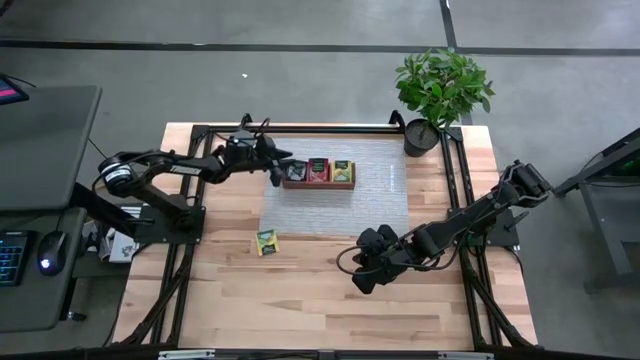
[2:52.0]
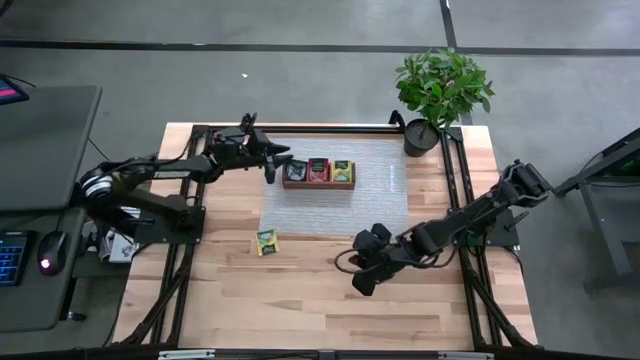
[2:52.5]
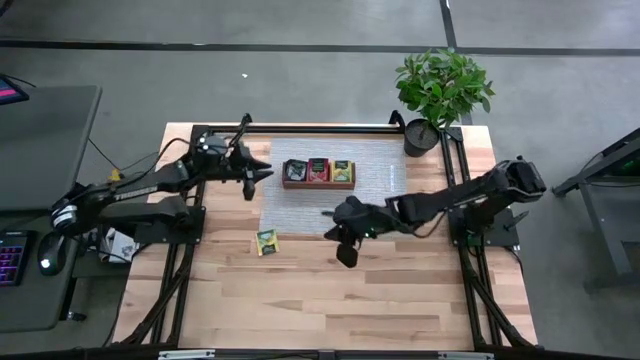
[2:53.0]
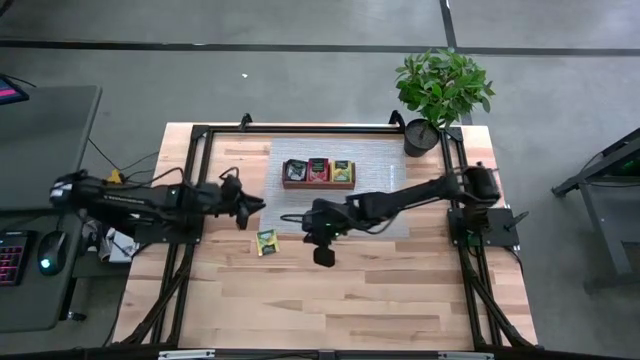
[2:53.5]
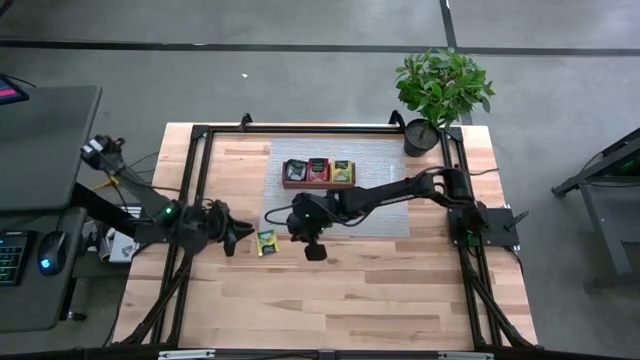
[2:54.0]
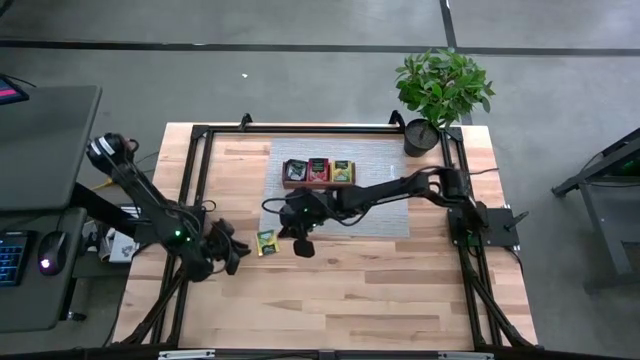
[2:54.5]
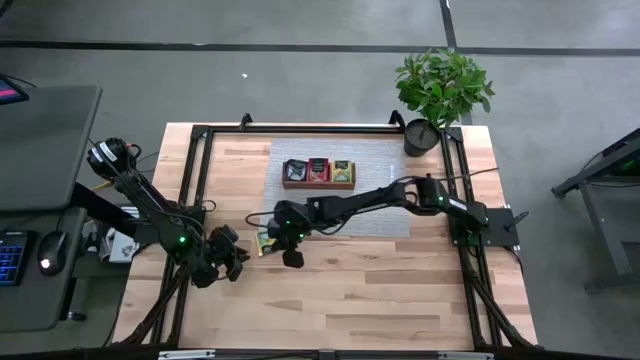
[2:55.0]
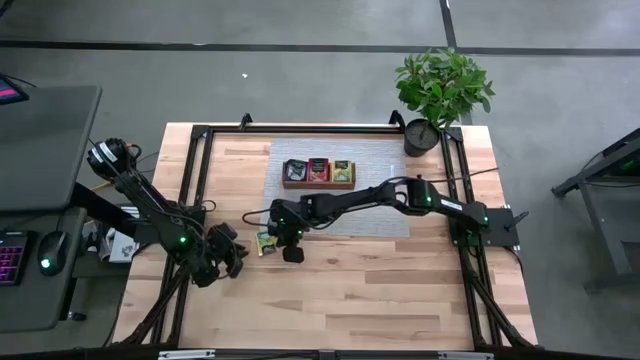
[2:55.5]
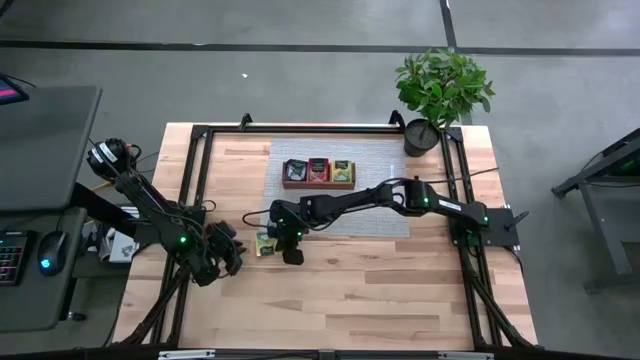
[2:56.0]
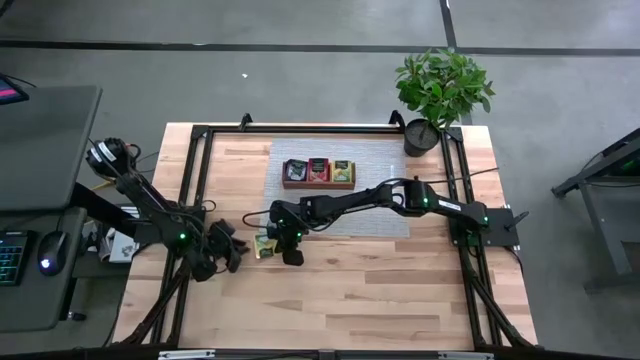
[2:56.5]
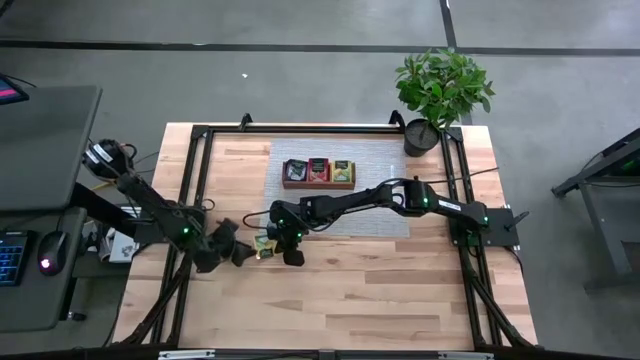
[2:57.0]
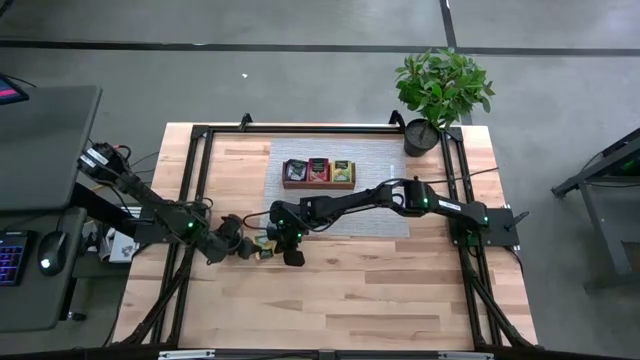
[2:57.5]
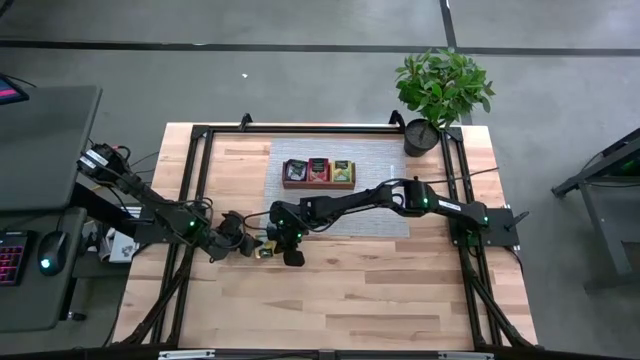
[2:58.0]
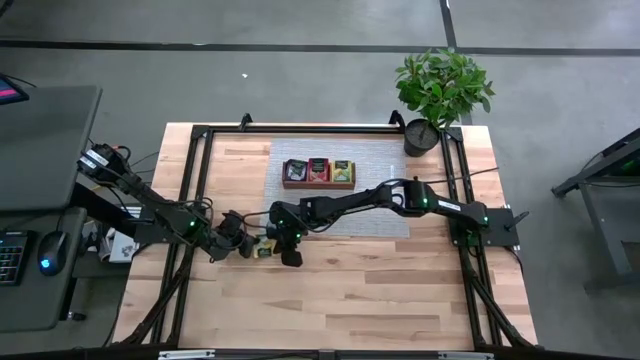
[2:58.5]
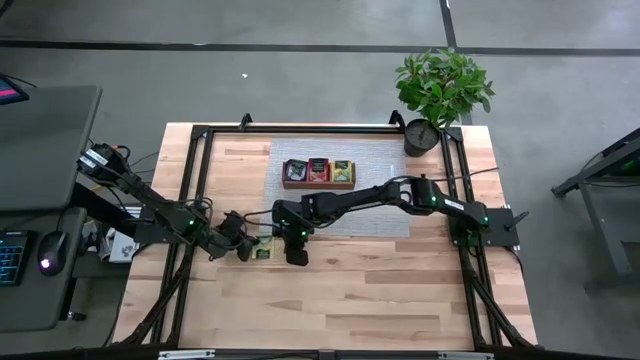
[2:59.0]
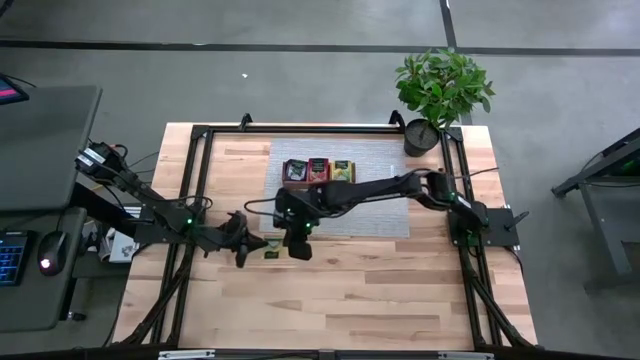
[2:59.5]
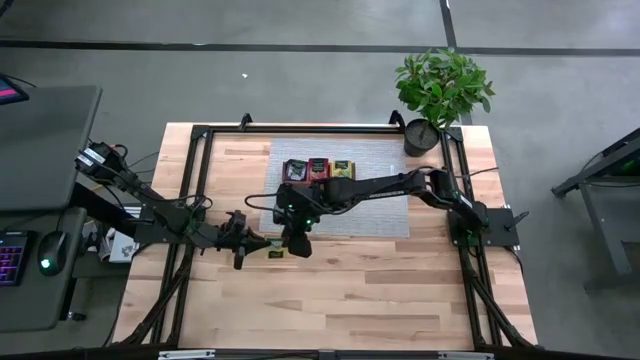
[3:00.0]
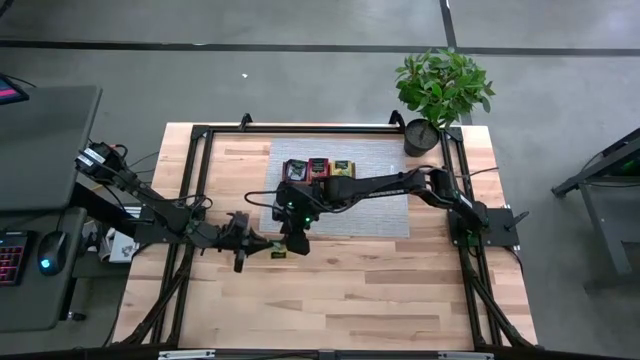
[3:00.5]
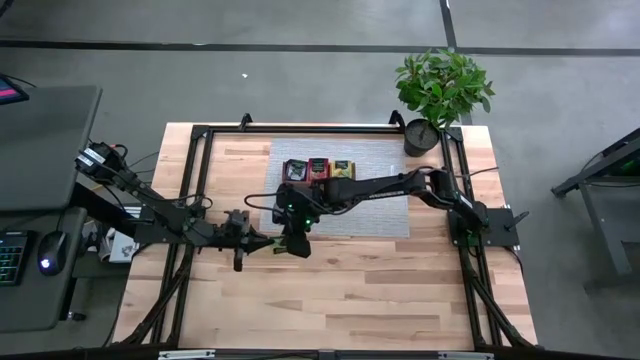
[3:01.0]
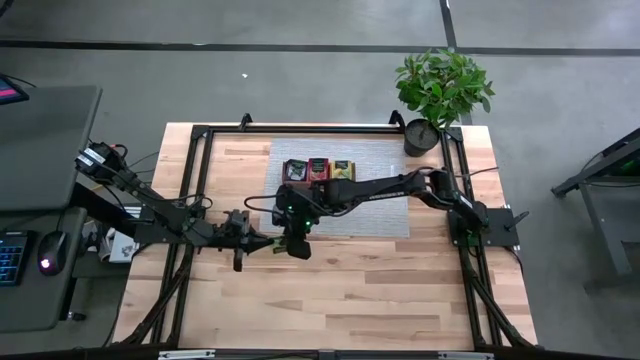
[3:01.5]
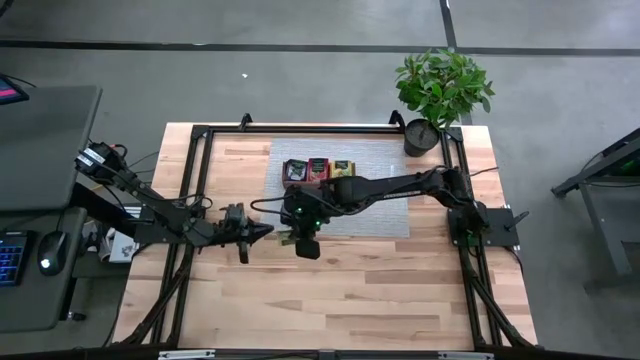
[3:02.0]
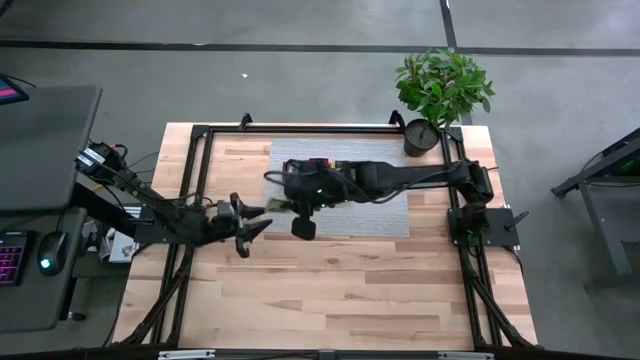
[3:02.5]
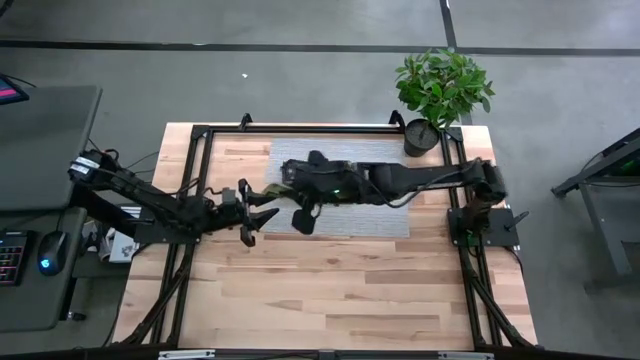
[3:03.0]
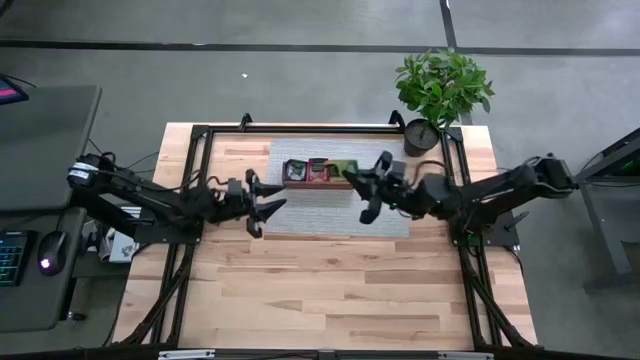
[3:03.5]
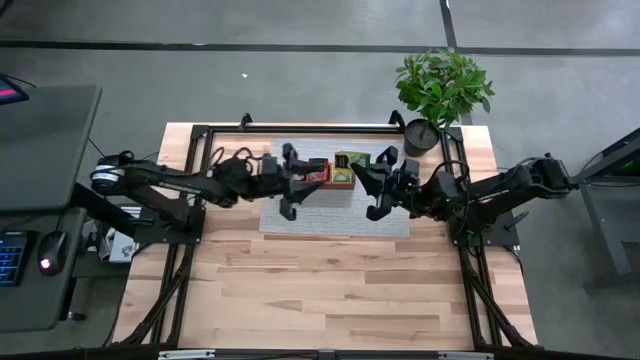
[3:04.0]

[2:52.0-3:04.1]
Task: Pick & Place Tea
Put the yellow tea bag into the right section of the wooden organizer

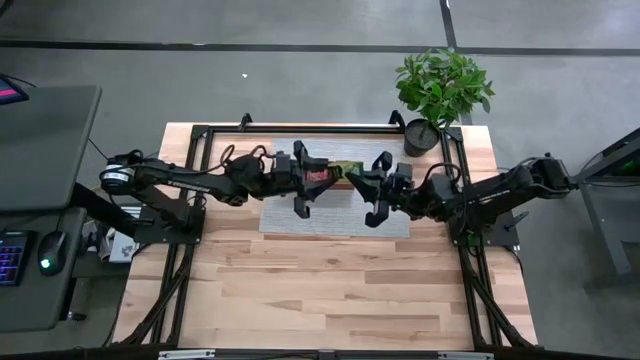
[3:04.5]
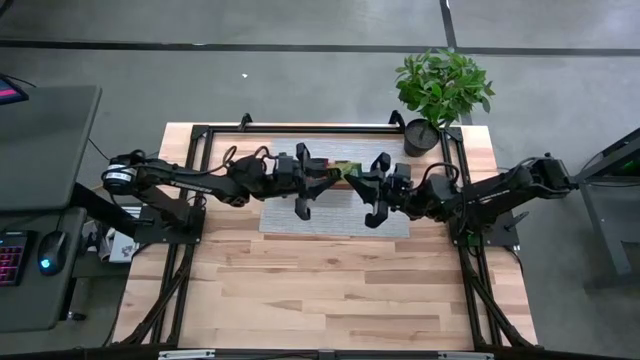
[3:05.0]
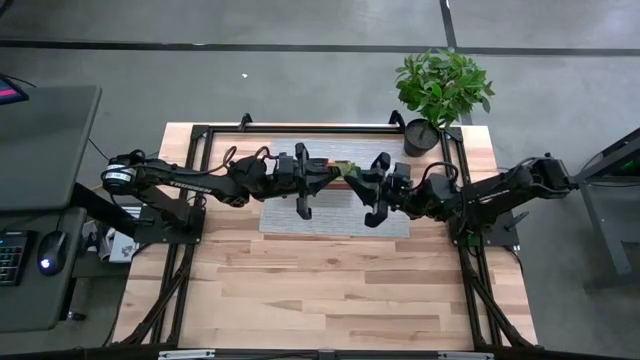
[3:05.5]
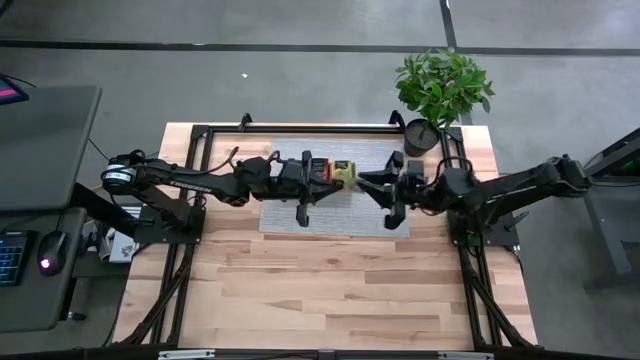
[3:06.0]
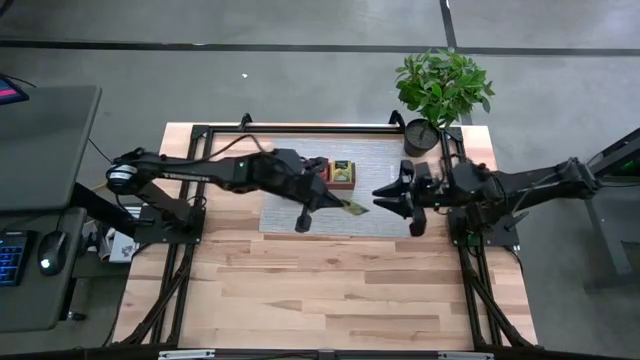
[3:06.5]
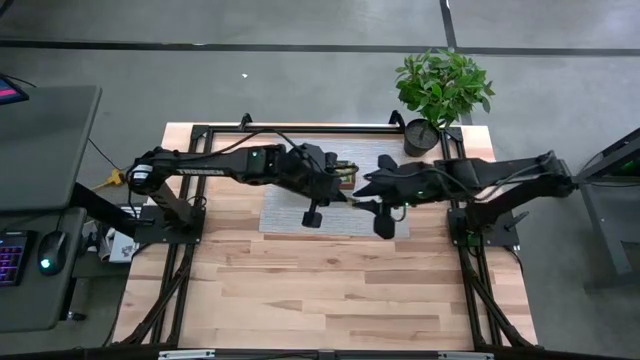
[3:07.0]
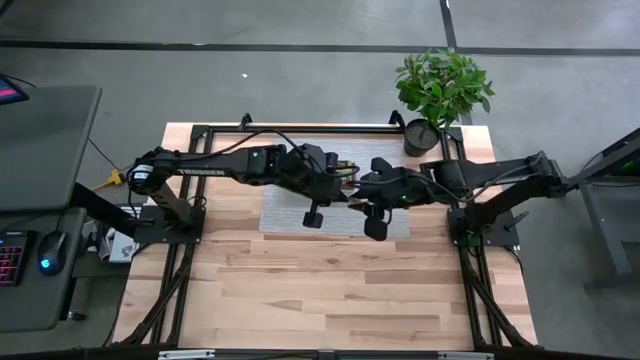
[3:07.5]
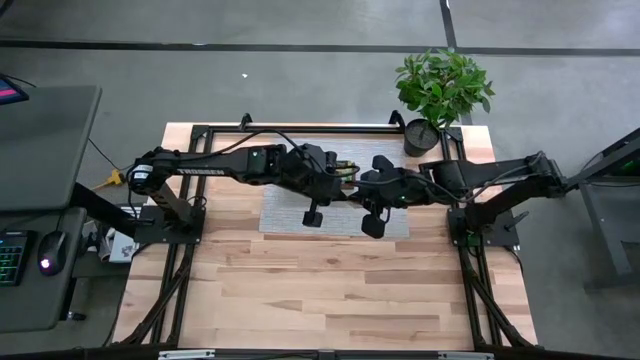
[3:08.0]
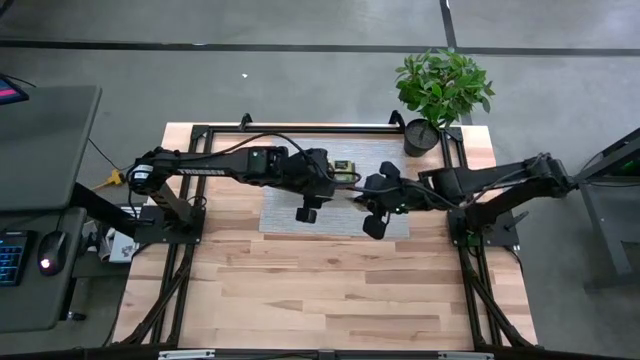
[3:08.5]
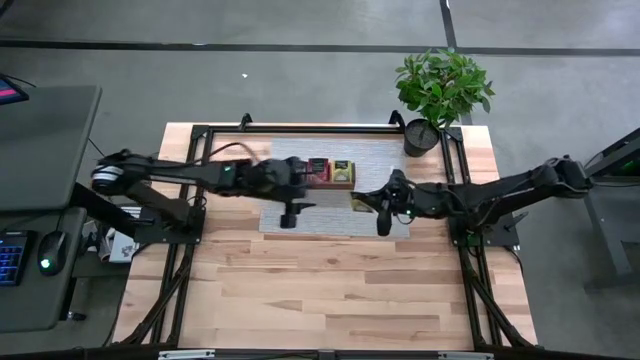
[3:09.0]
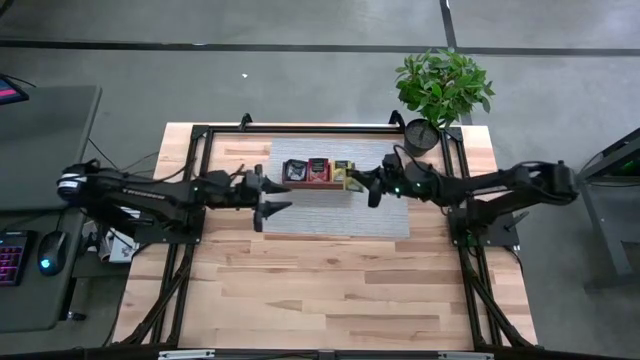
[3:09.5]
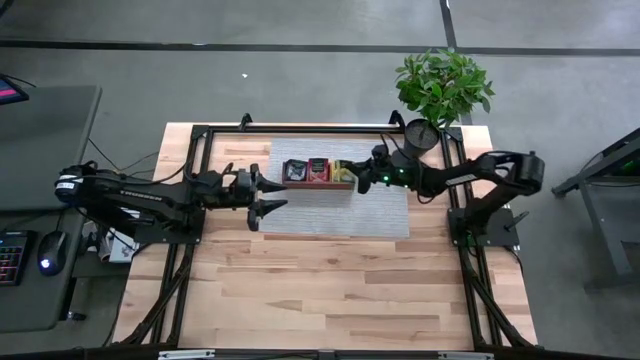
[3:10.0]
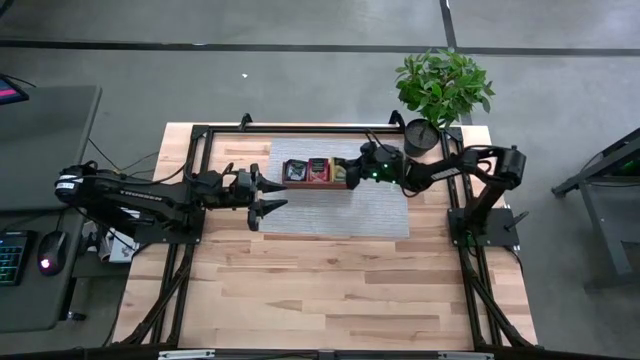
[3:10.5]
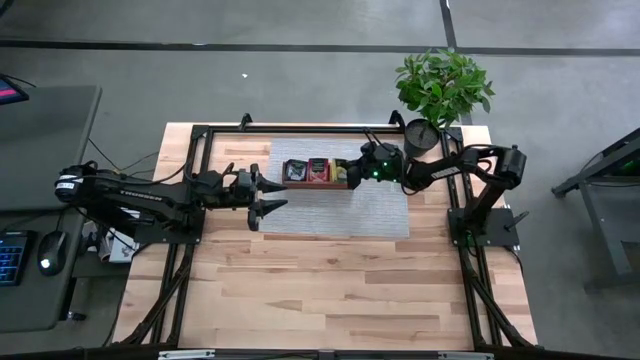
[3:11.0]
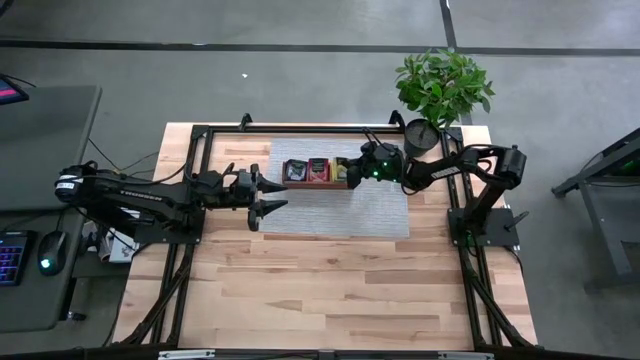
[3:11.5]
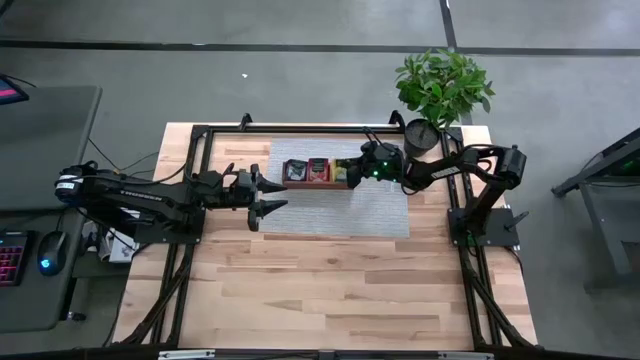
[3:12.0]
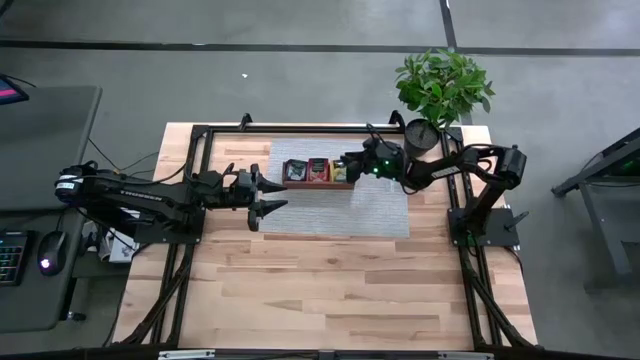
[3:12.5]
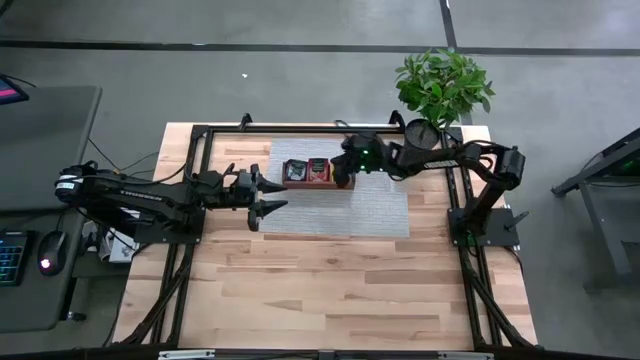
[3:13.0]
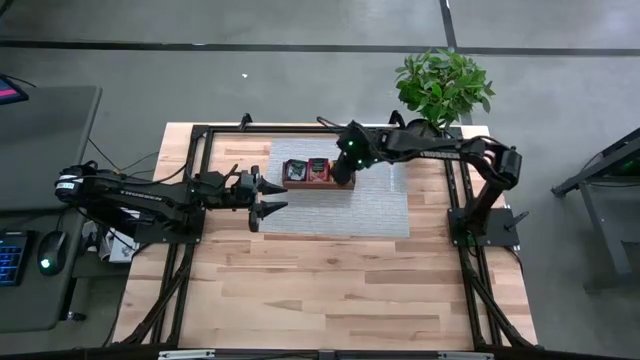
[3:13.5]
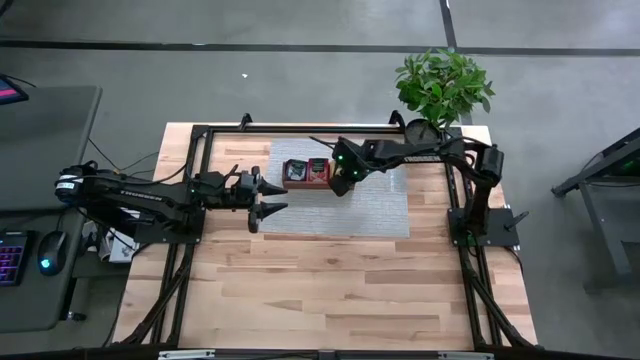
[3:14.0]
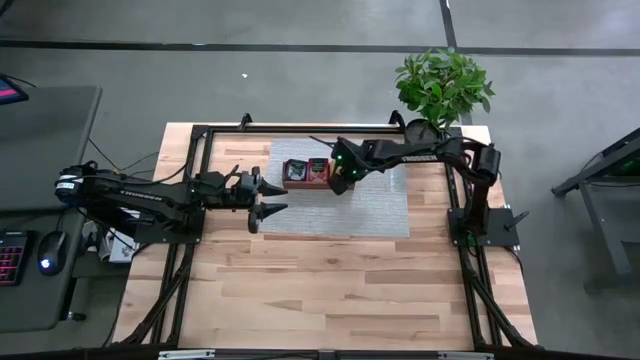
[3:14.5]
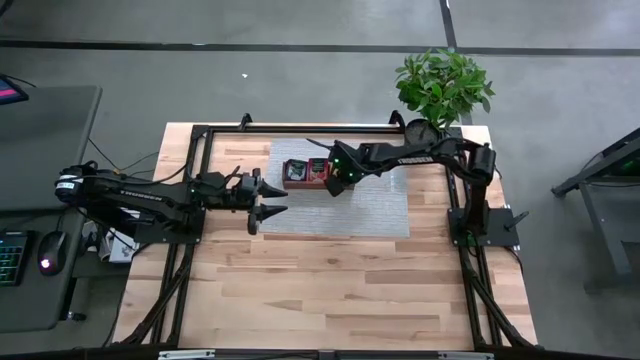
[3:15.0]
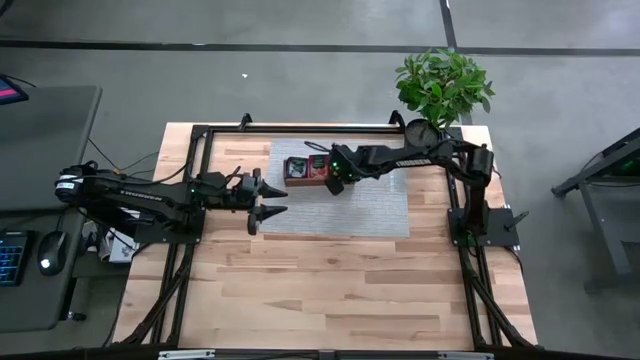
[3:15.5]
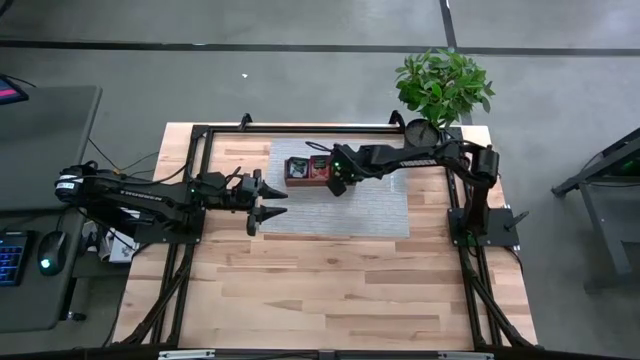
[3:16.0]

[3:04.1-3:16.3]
Put the yellow tea bag into the right section of the wooden organizer
